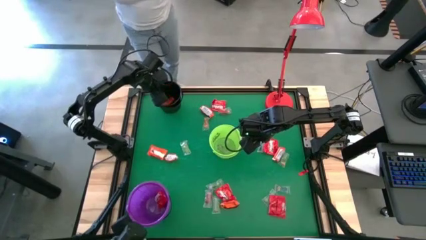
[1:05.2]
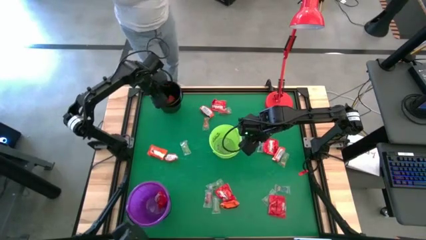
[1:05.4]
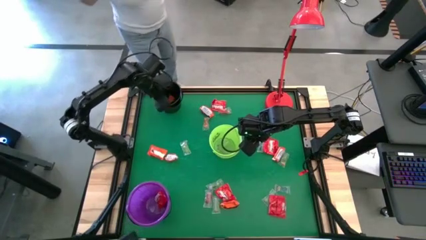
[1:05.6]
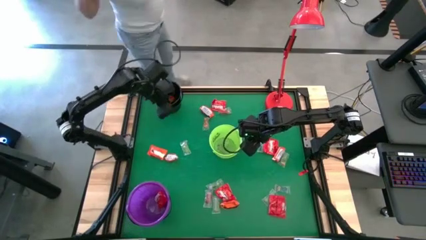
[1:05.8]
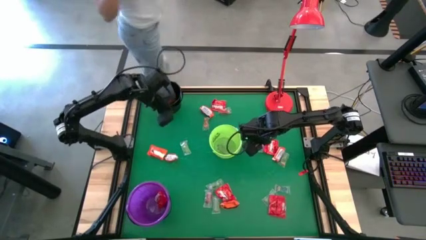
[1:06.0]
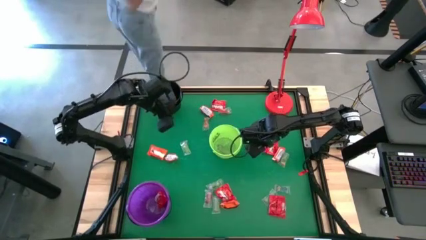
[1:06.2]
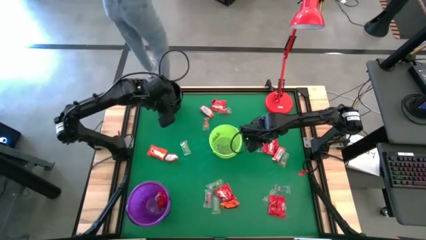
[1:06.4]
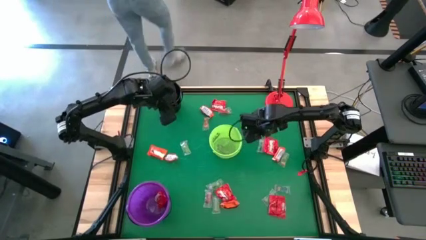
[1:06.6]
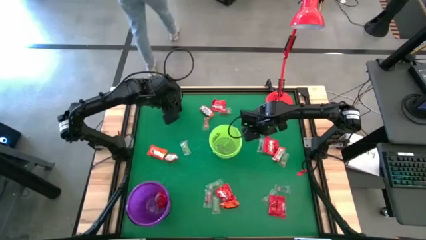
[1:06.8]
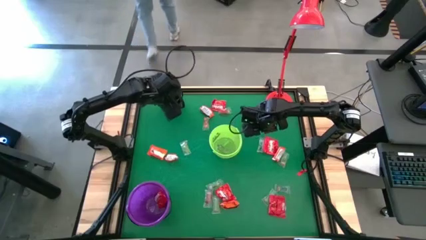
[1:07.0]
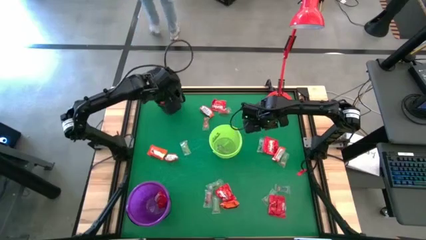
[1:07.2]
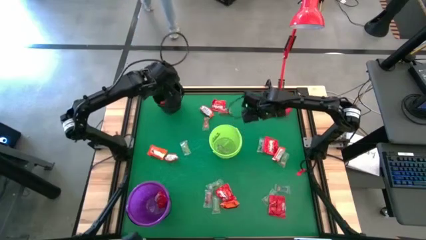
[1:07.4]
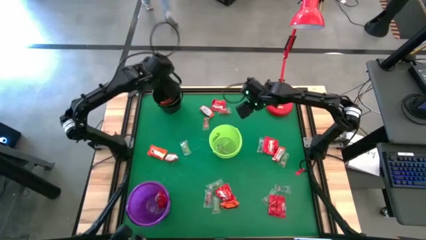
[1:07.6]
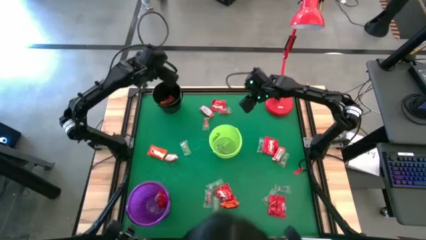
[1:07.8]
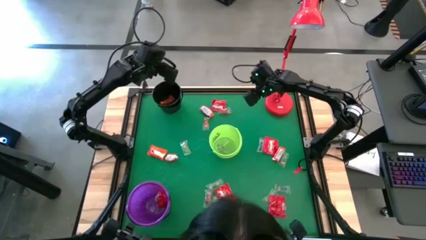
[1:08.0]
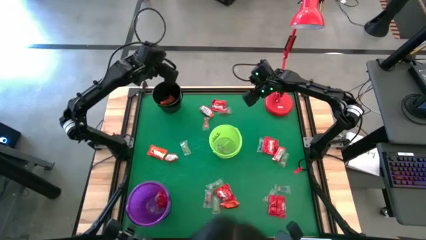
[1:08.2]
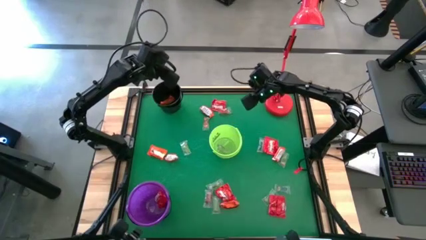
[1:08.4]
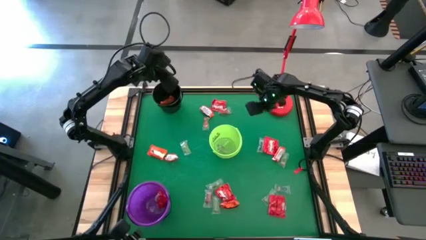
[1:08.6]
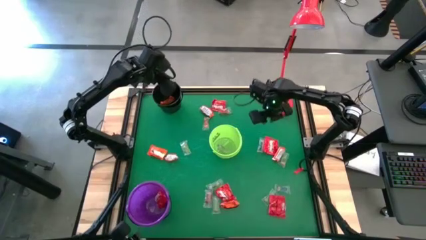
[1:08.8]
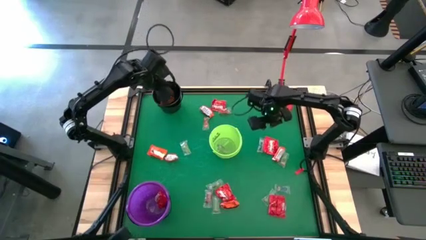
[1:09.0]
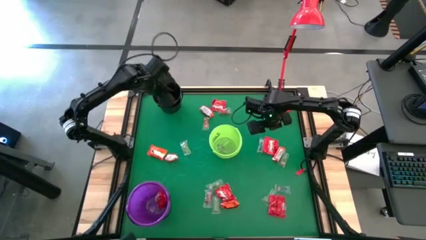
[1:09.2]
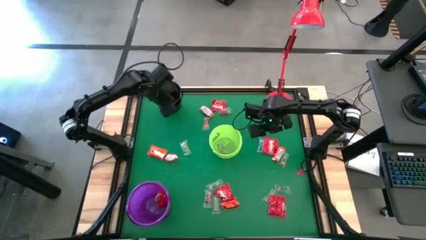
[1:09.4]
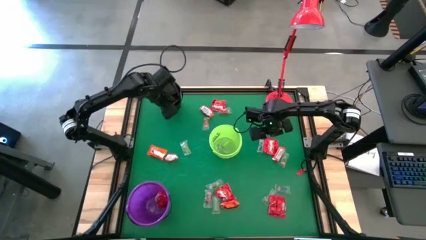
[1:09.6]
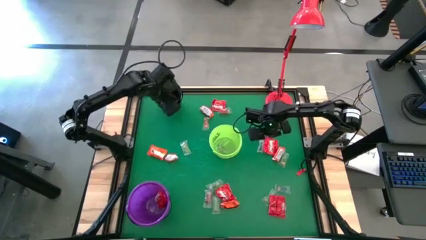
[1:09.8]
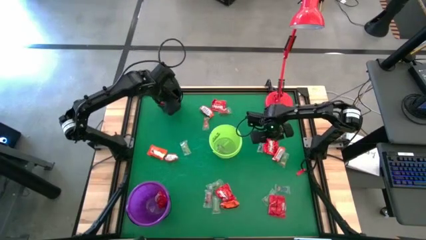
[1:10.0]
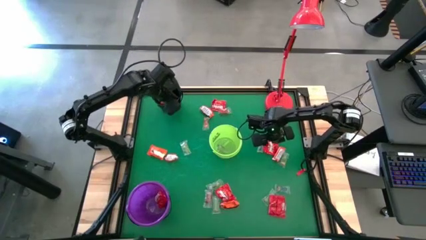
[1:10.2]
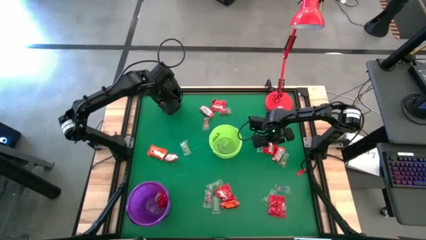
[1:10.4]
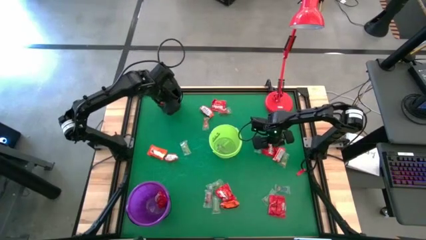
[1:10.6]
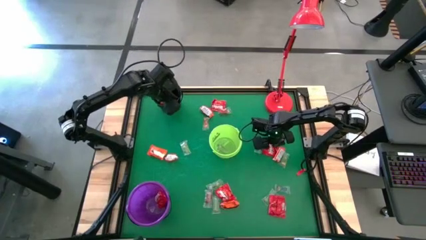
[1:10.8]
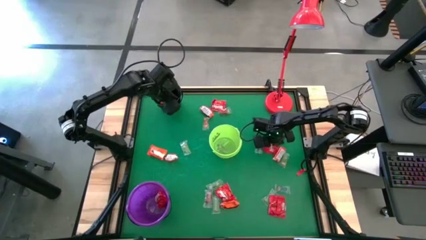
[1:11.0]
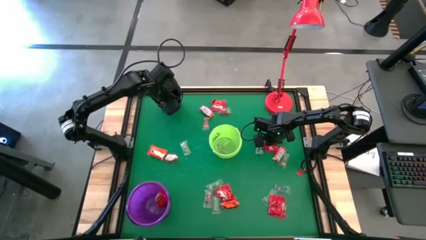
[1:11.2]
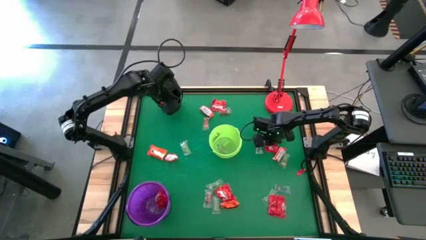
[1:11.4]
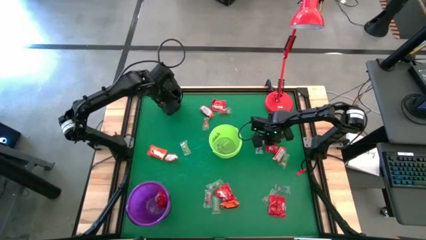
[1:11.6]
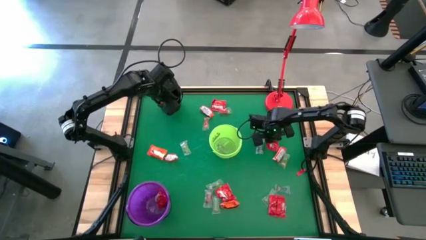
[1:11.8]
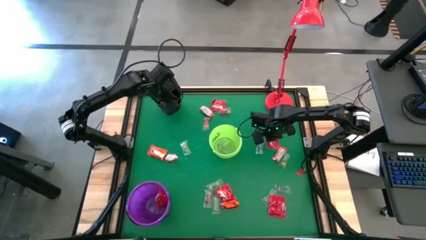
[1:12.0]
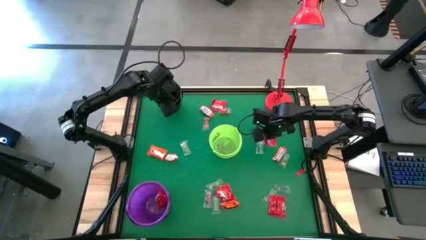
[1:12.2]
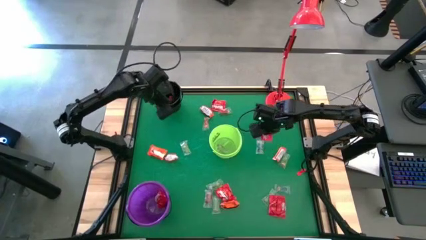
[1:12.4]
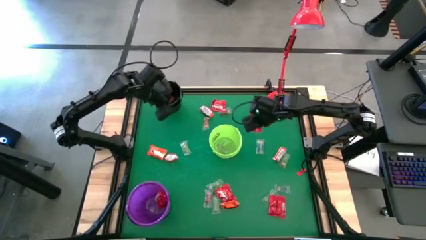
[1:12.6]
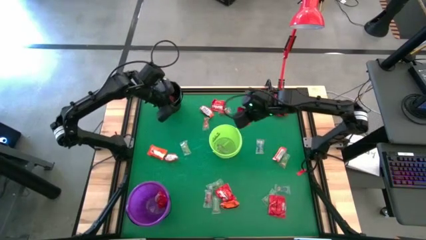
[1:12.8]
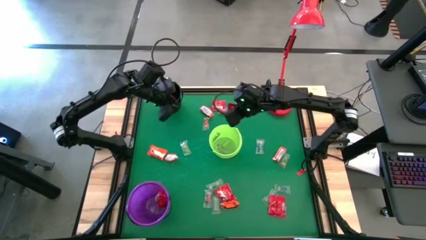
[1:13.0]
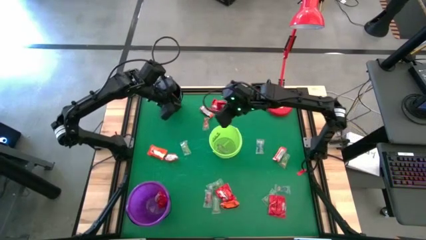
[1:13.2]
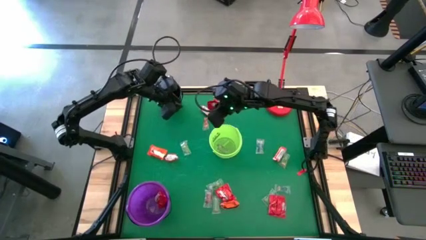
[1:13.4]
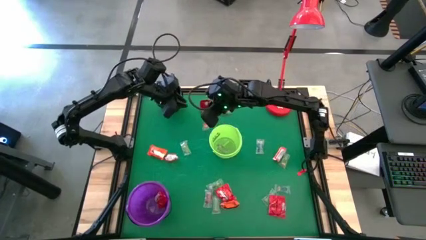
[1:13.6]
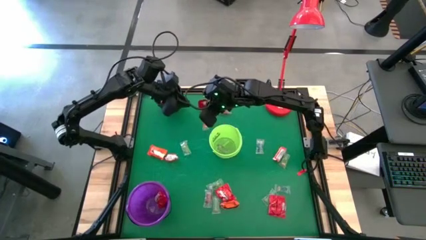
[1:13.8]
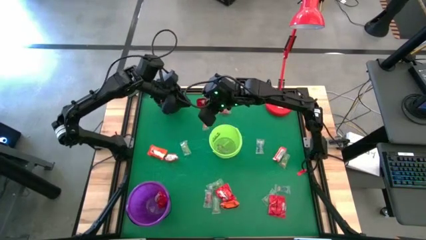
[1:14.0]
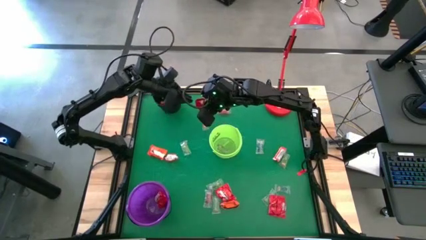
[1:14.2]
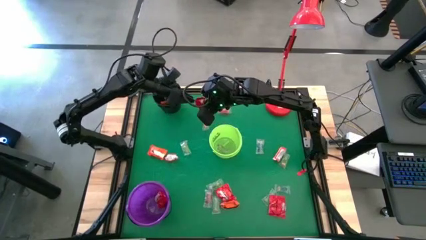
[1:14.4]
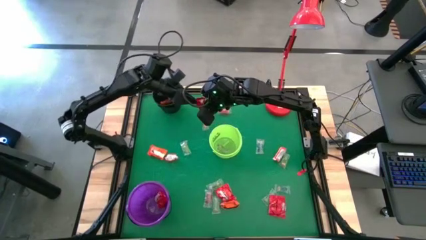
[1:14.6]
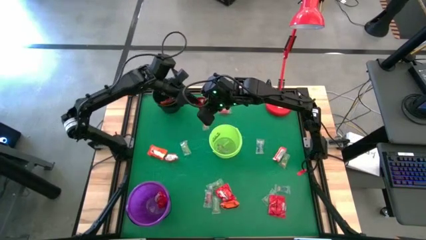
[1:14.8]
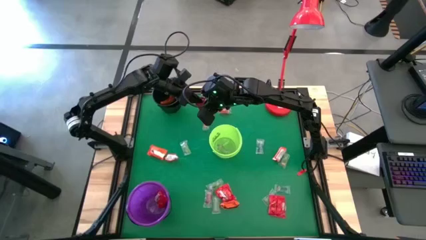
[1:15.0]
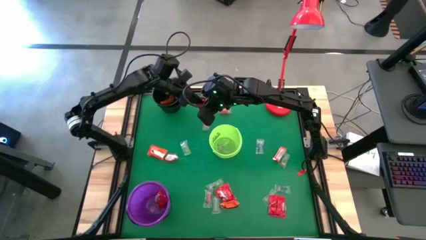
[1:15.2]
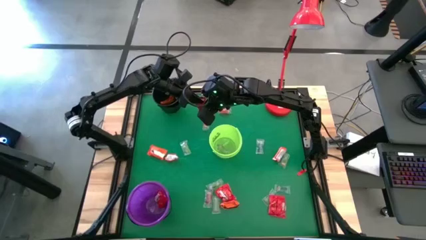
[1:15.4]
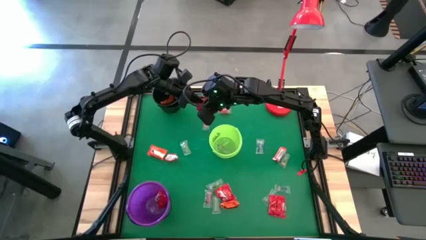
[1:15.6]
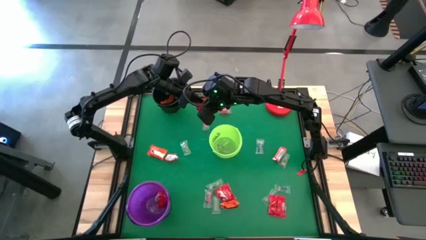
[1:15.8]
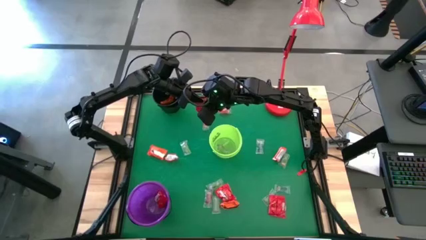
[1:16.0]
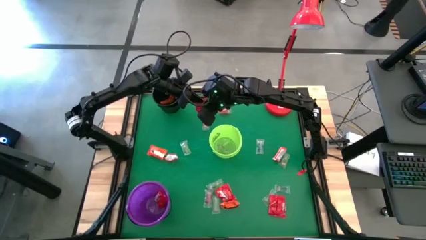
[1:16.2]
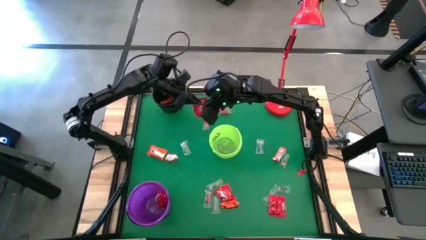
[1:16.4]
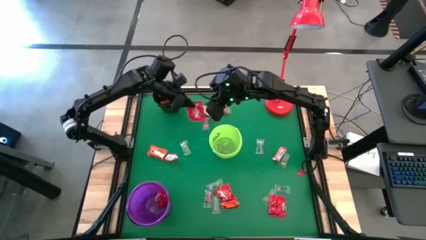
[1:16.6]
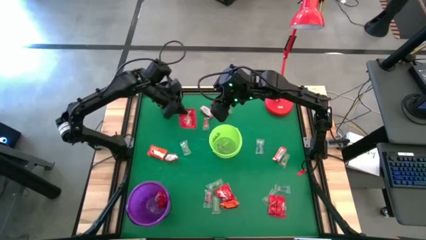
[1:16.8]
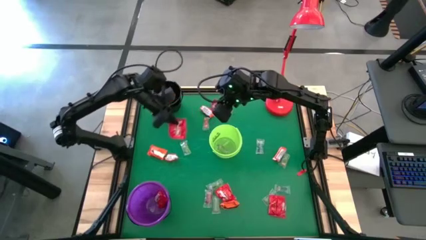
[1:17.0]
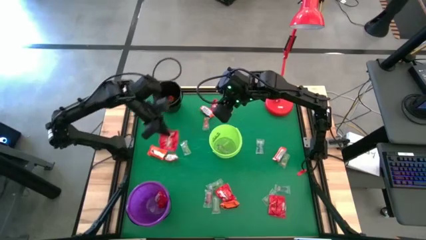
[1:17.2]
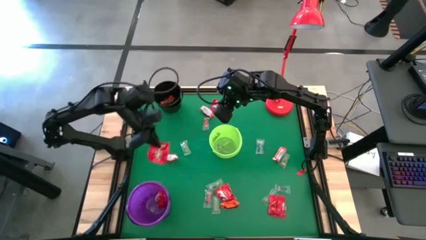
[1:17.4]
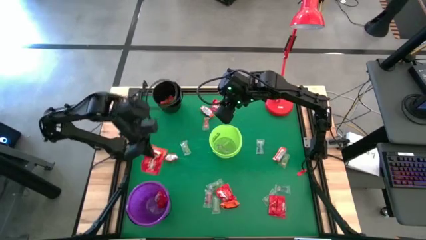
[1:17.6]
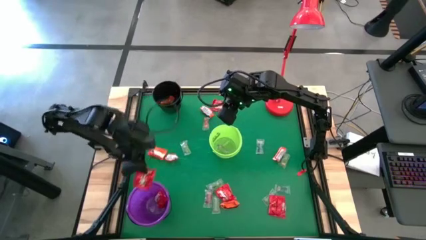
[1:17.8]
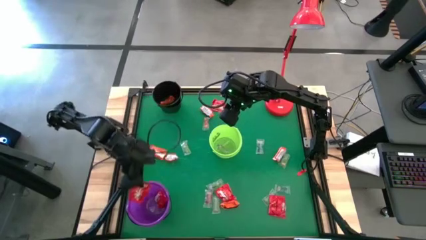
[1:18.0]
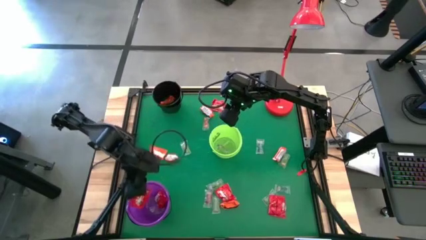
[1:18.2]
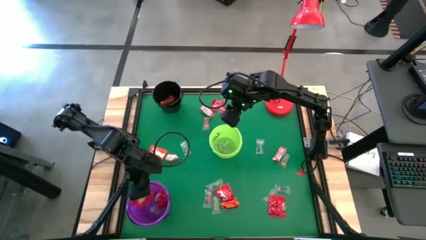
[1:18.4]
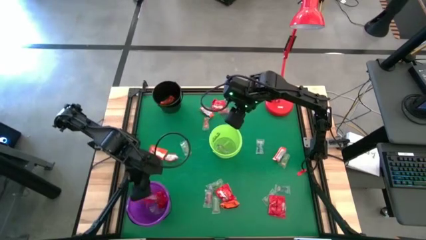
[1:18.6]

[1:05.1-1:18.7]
Task: Sort candy
Put the red candy into the violet bucket

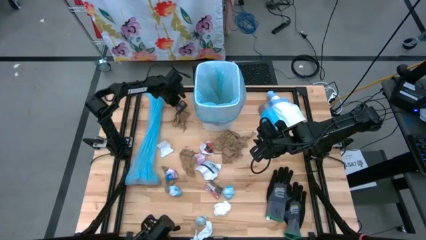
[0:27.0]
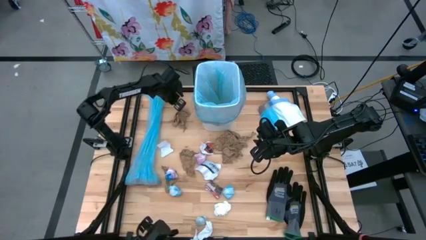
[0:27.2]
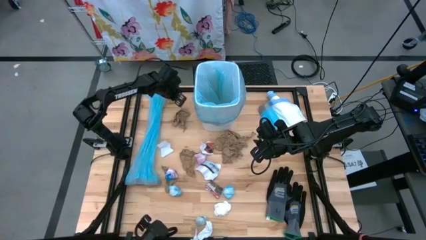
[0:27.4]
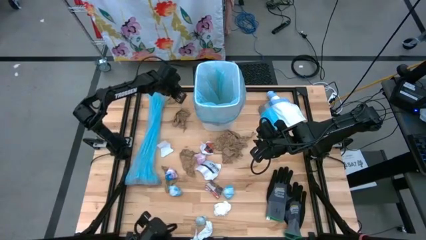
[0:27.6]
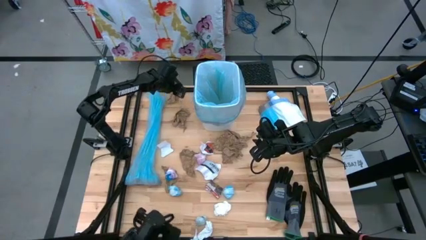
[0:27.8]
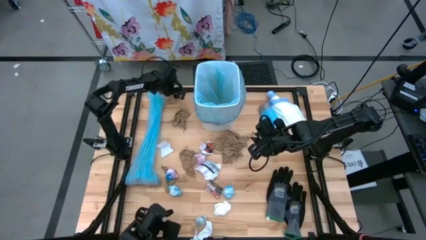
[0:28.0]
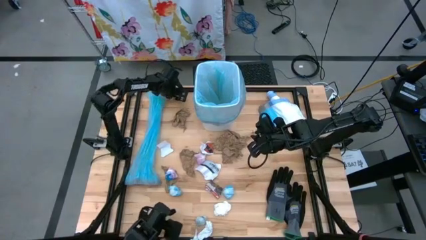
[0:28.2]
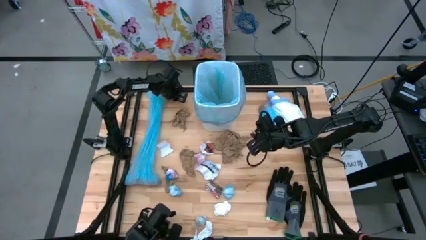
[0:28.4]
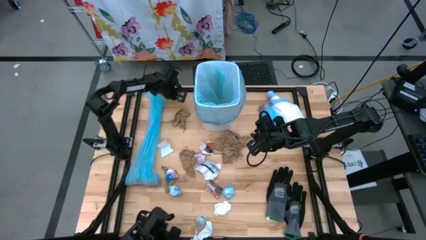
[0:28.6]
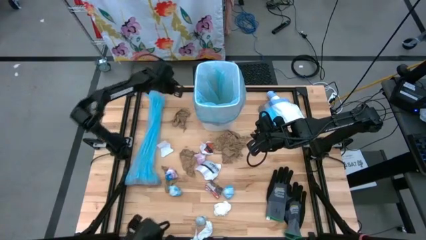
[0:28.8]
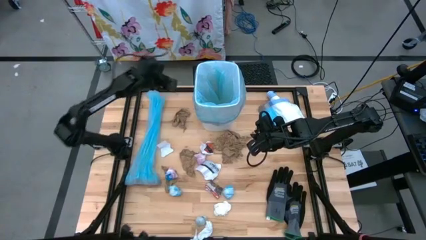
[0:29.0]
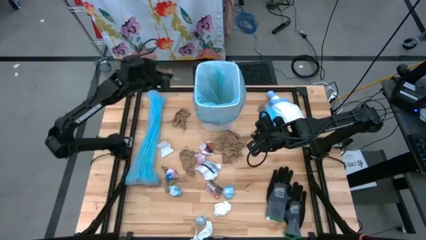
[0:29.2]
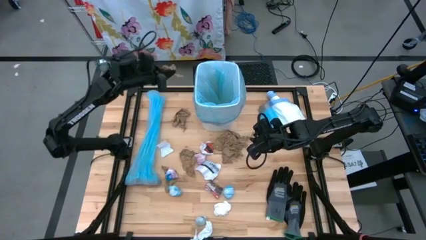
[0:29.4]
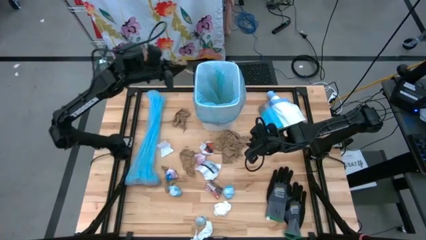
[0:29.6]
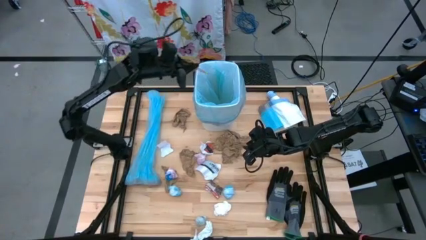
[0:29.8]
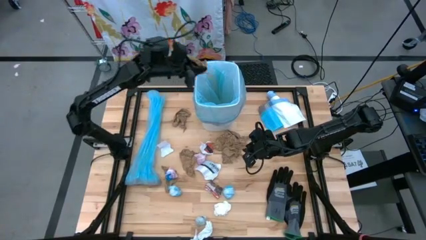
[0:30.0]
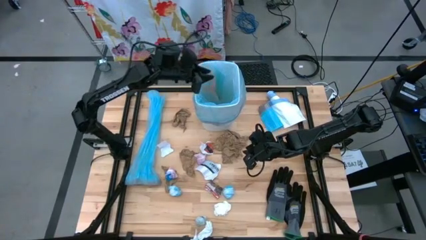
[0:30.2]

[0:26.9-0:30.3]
Task: place trash/remove bag and relplace
Put the brown paper into the blue trash bag inside the white trash bin
